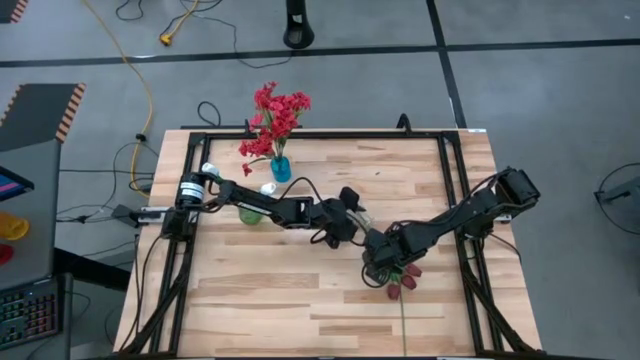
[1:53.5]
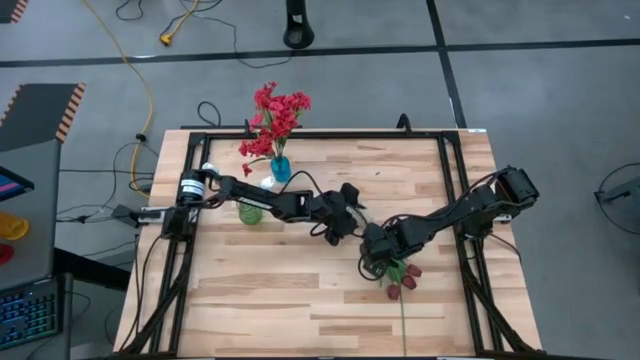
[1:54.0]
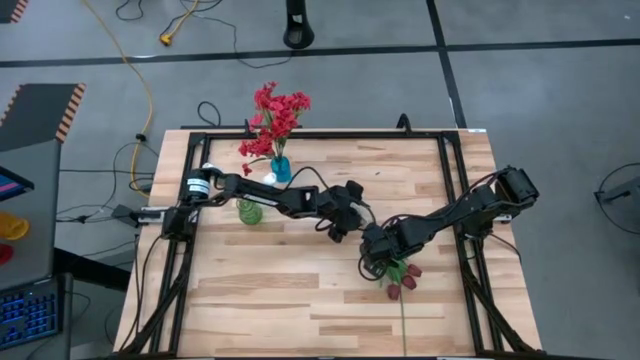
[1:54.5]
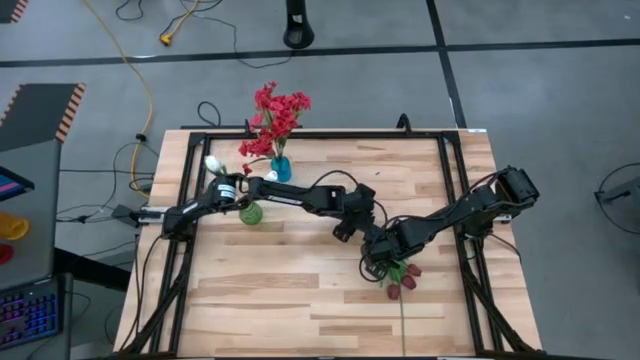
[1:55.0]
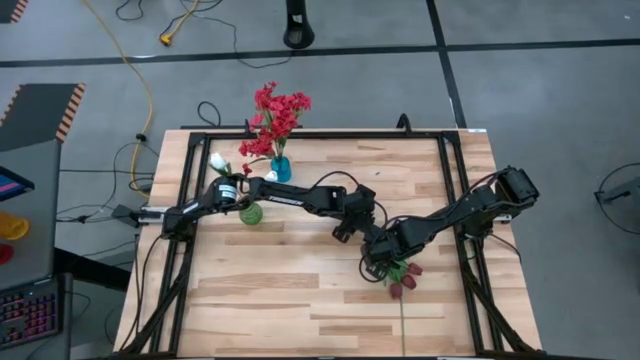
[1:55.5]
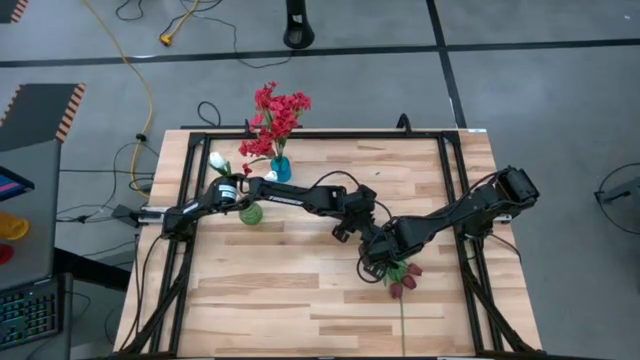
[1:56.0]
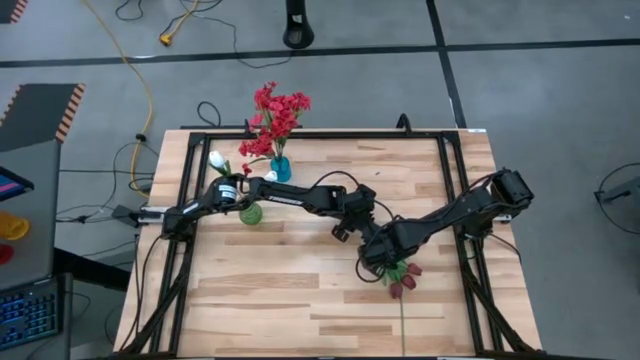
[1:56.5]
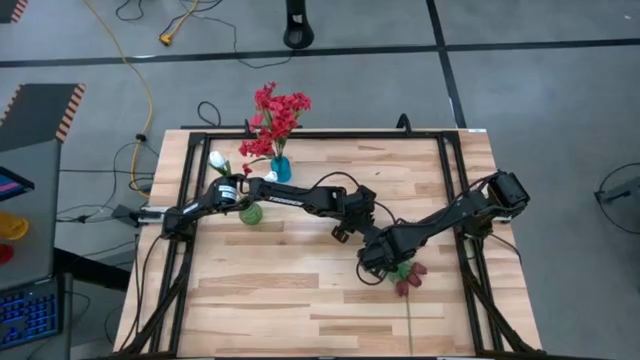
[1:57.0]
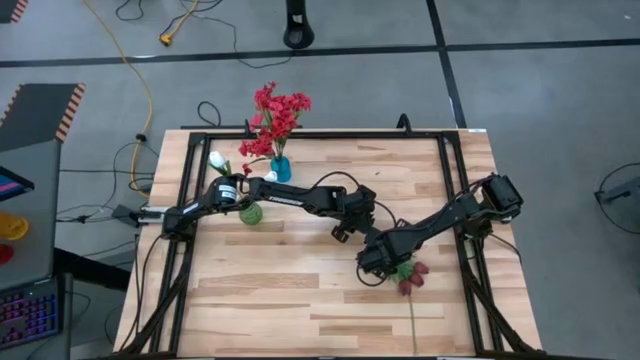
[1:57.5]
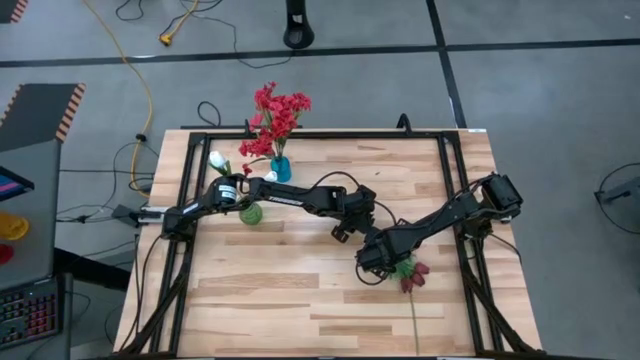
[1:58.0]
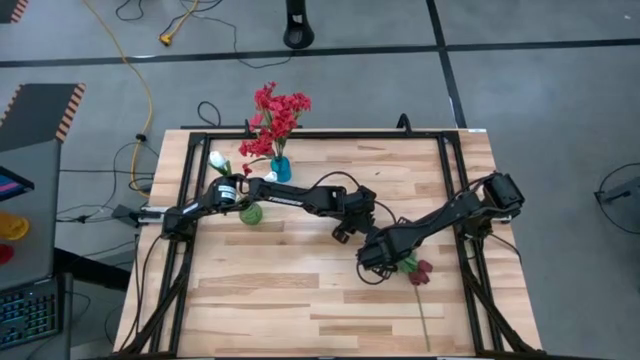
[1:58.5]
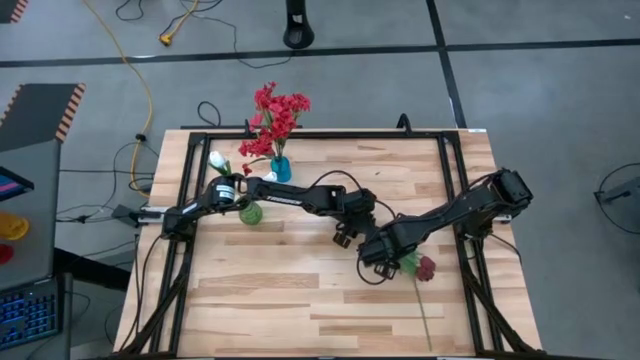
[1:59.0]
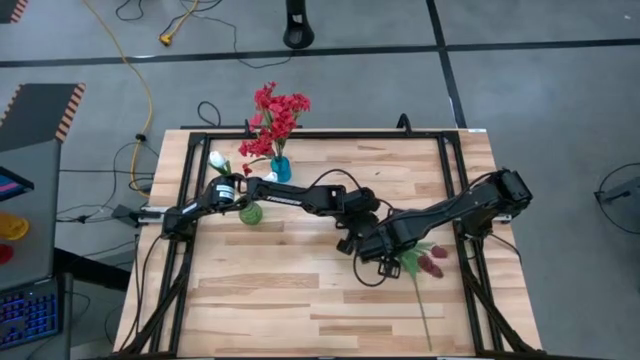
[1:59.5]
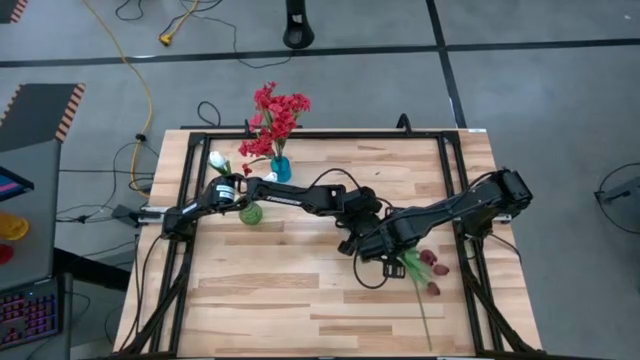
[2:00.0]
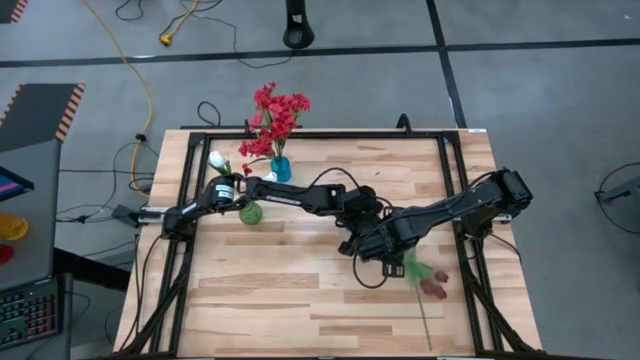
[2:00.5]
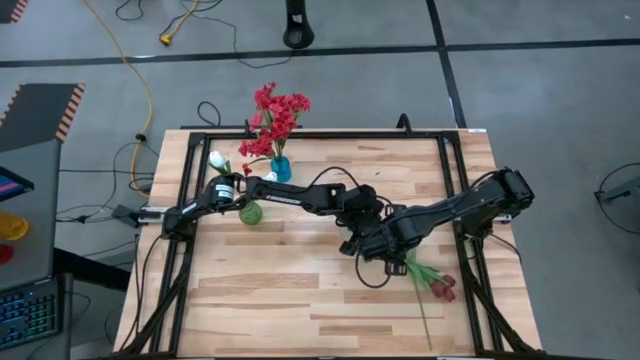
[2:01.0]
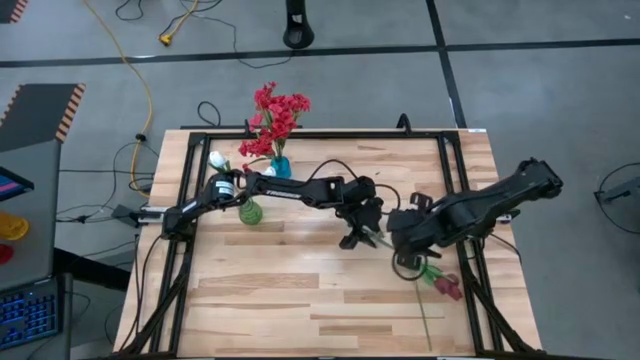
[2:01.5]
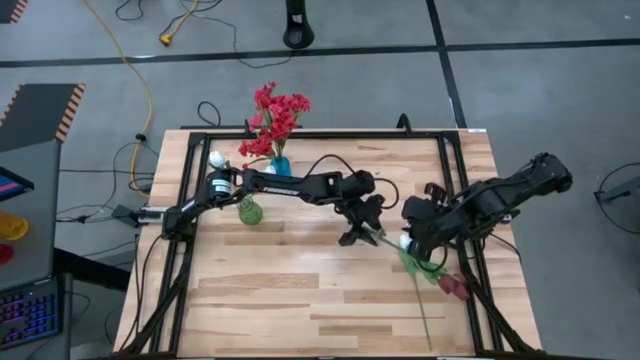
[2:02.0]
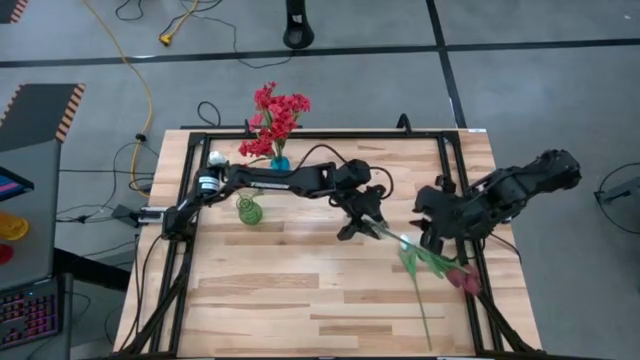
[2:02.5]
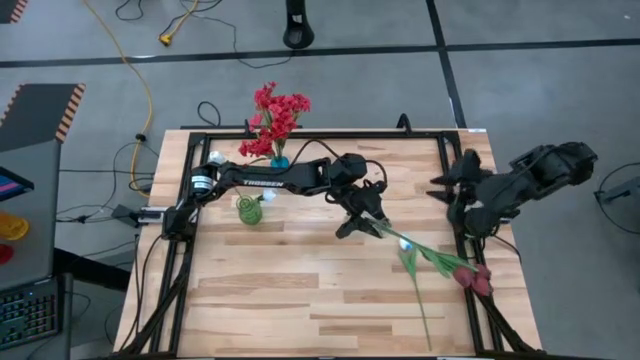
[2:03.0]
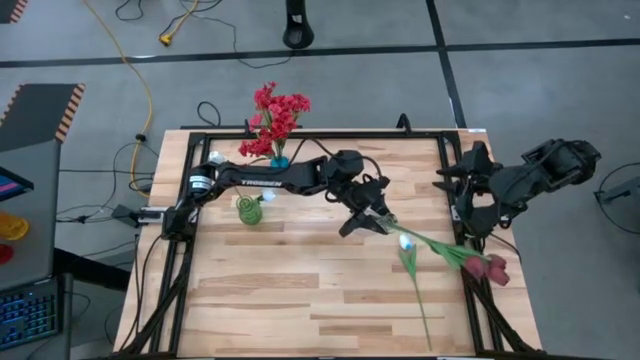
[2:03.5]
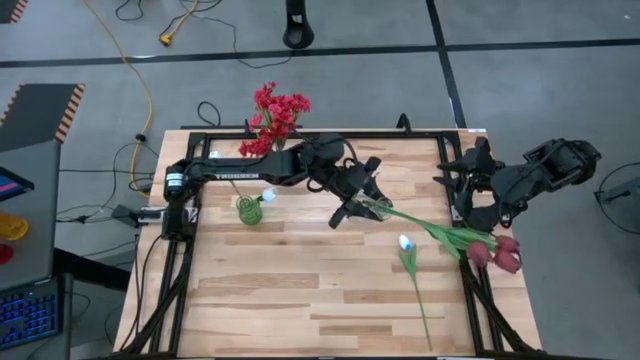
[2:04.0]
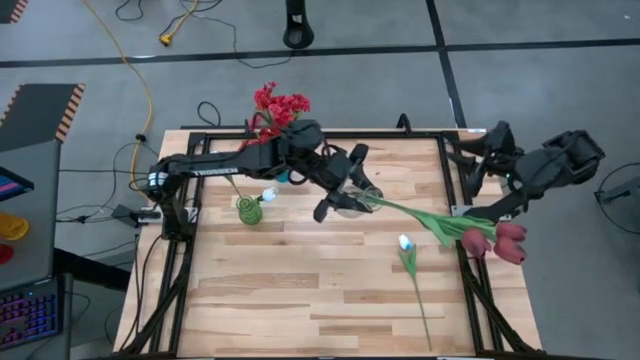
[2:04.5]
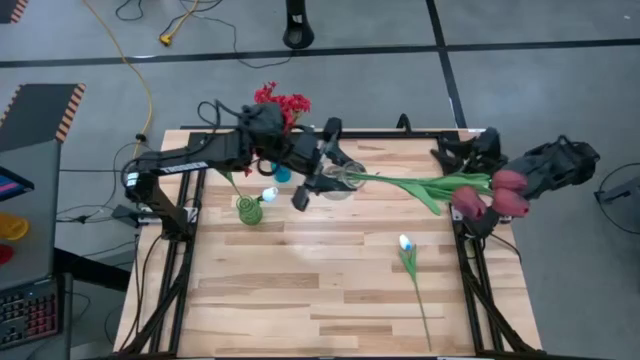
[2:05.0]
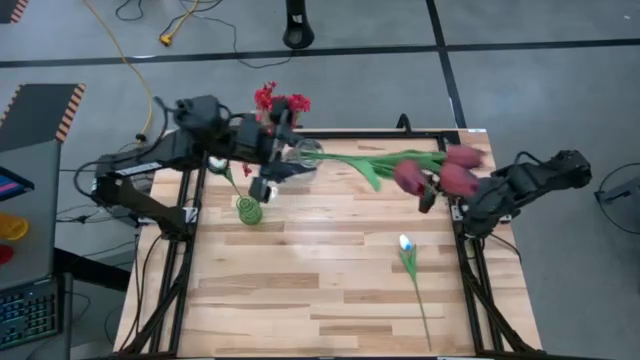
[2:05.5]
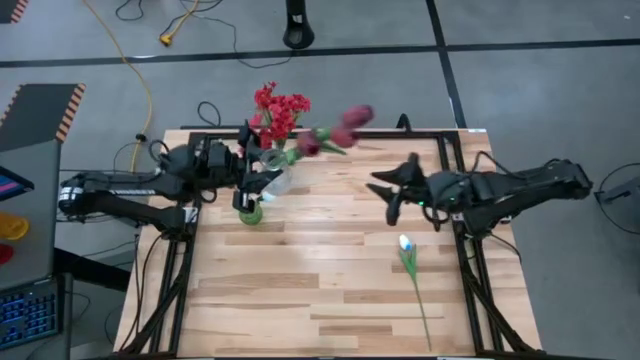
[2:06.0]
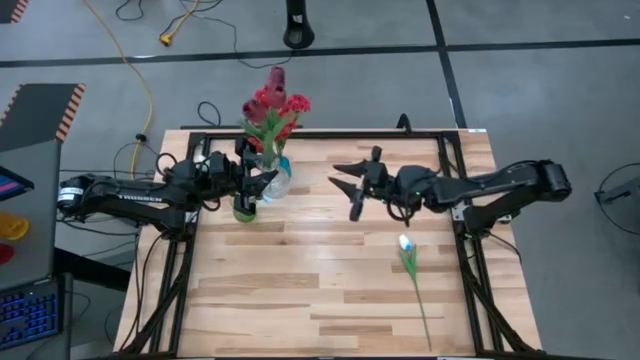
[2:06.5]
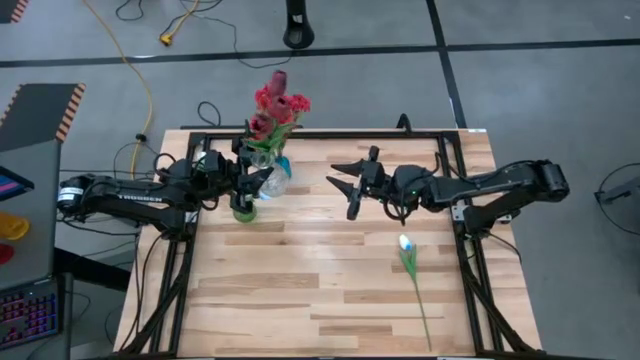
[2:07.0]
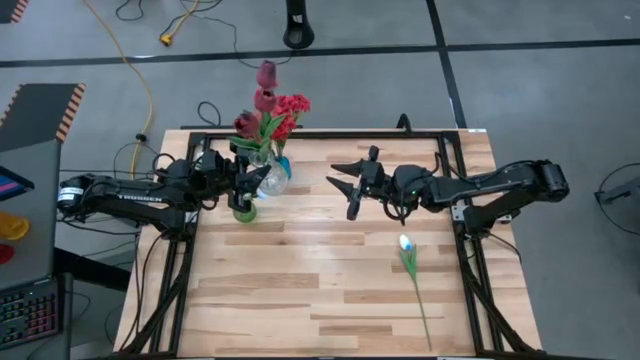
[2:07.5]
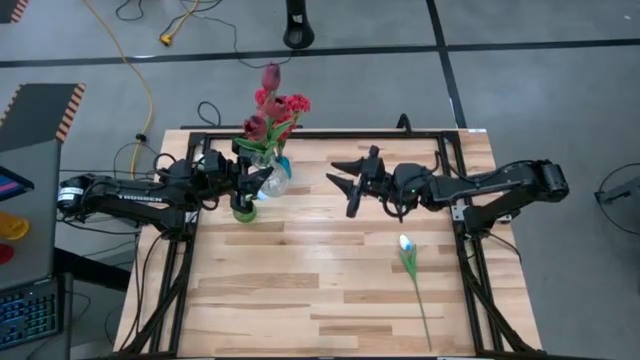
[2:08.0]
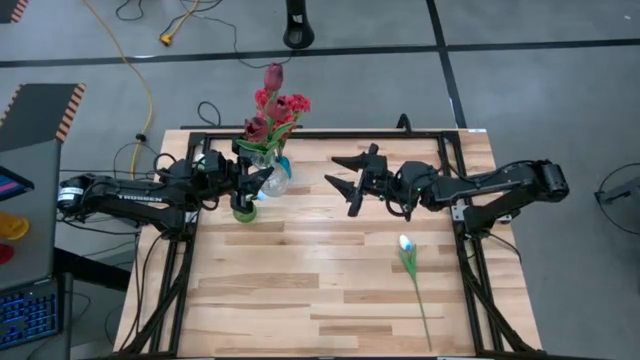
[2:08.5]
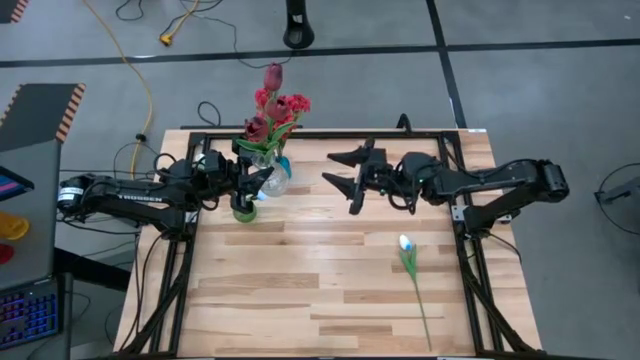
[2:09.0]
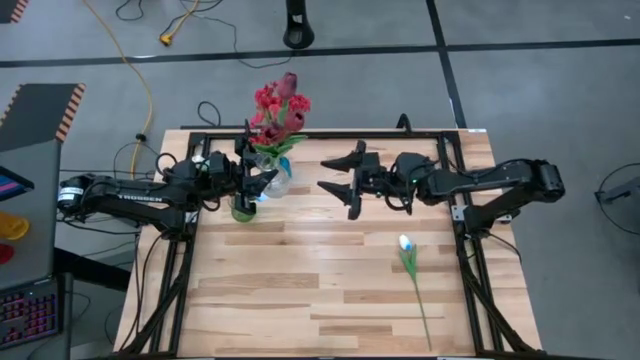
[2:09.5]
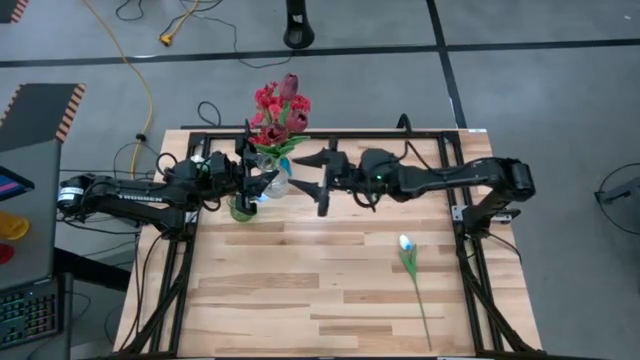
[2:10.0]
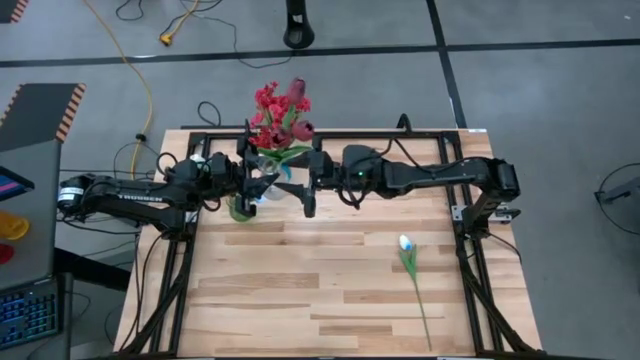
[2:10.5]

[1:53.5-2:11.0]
Task: Sort flowers into vase by color
Adjust the transparent vase by standing it upright on the table

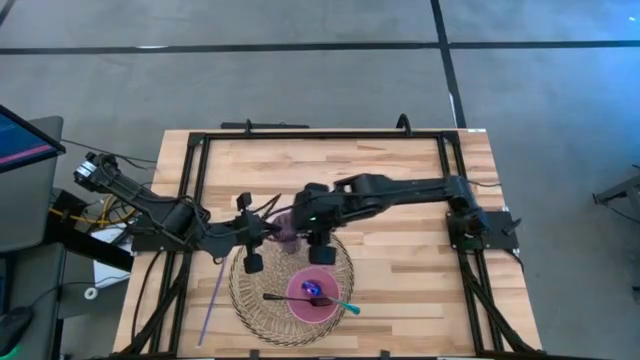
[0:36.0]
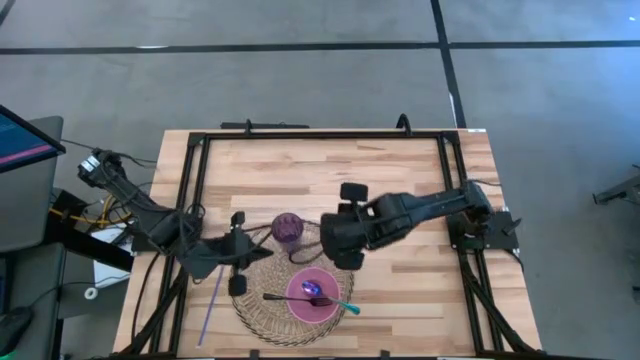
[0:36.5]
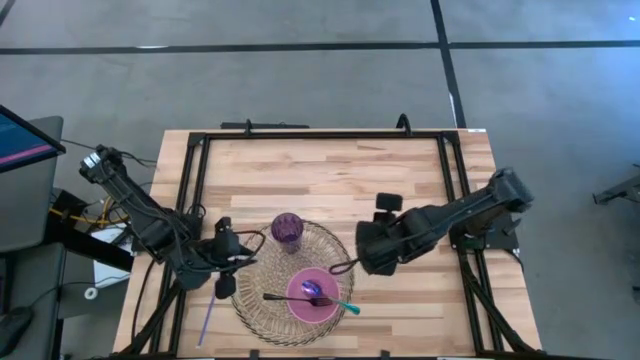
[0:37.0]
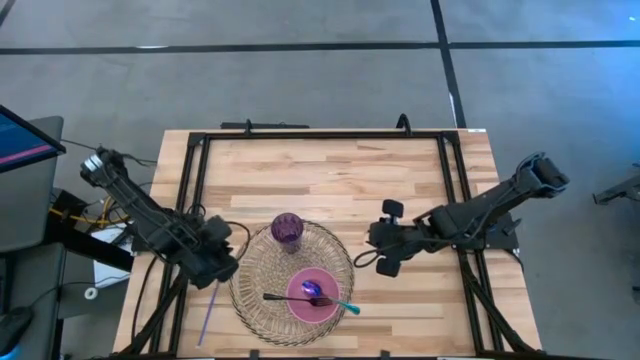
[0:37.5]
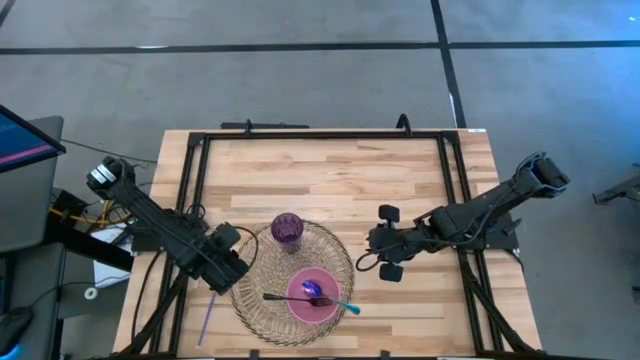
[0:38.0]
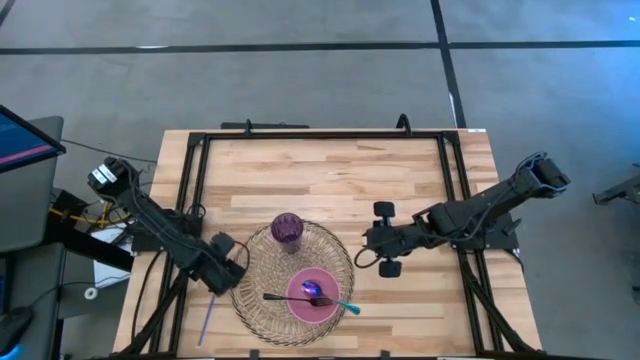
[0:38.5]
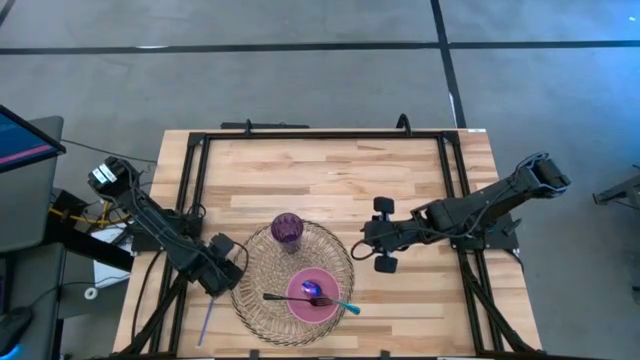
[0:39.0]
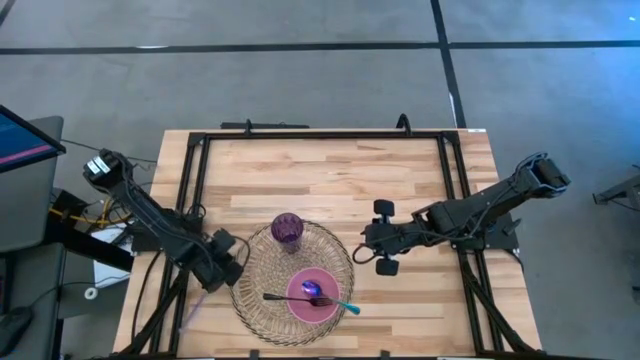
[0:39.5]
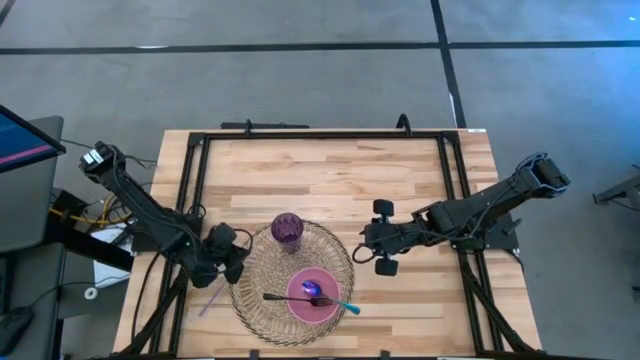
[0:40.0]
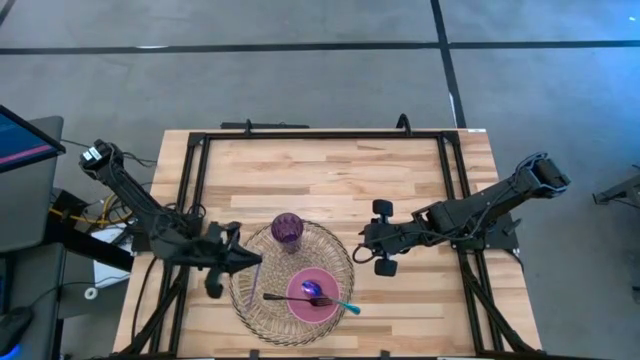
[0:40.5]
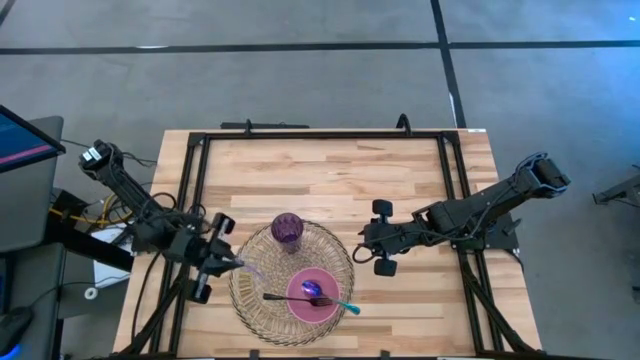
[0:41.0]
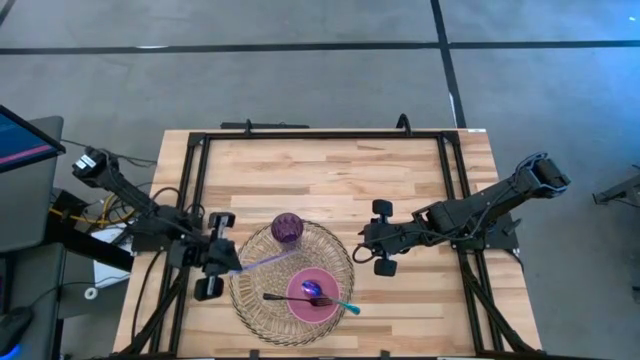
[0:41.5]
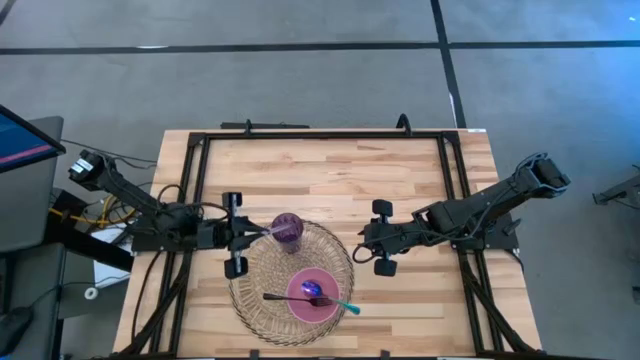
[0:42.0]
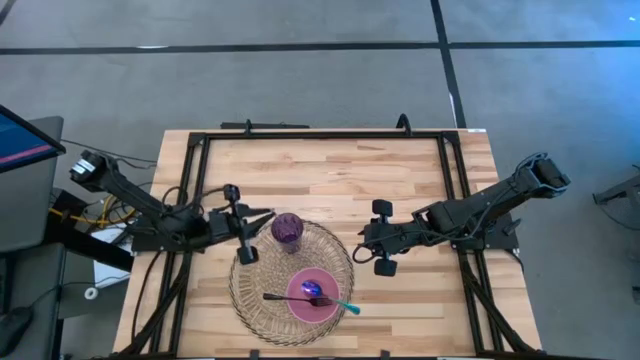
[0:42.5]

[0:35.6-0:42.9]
Task: Pick & Place Utensil
Put the purple straw into the purple cup
